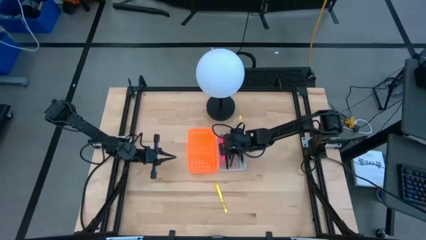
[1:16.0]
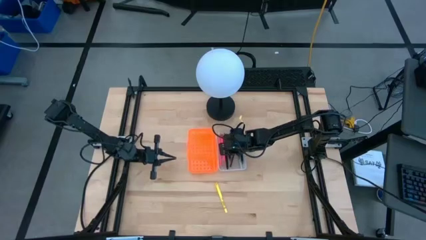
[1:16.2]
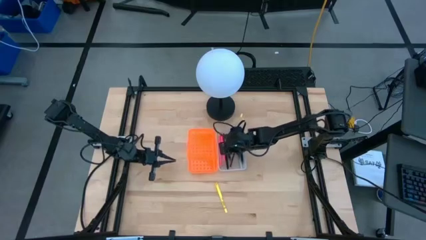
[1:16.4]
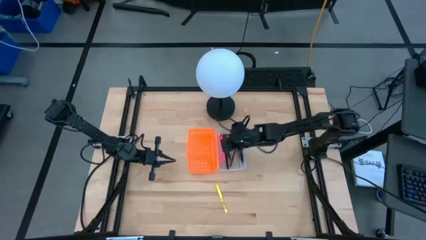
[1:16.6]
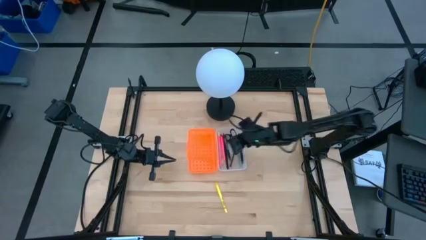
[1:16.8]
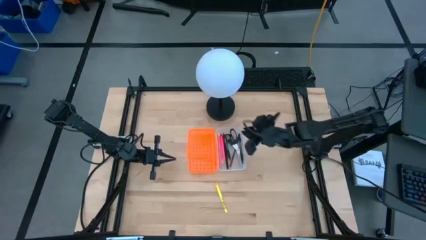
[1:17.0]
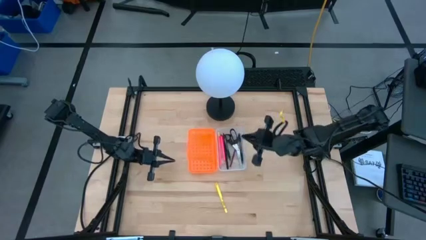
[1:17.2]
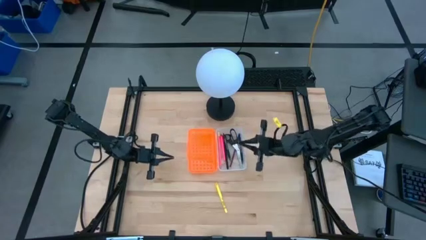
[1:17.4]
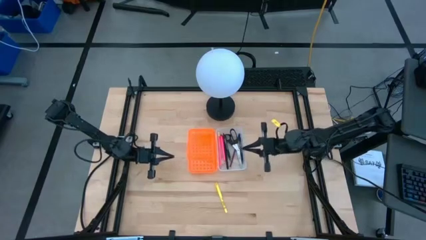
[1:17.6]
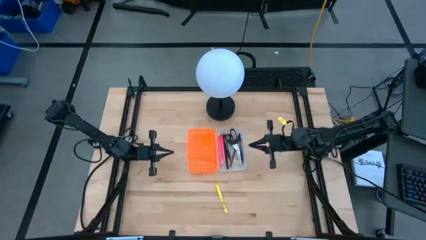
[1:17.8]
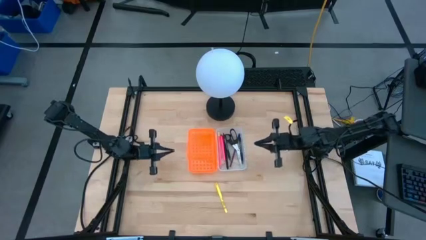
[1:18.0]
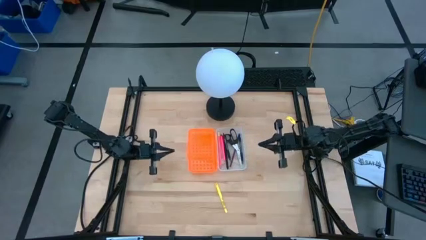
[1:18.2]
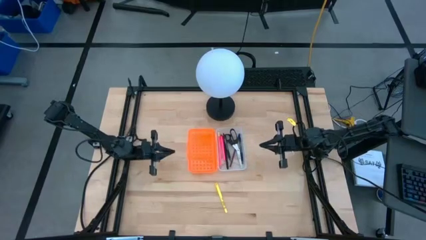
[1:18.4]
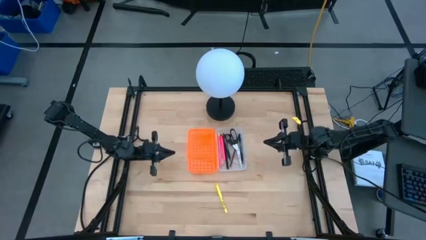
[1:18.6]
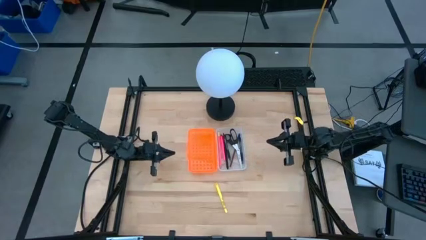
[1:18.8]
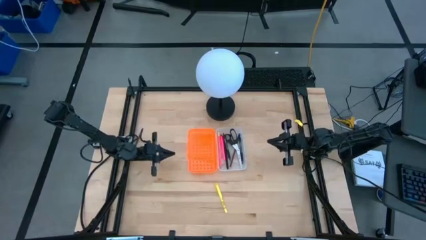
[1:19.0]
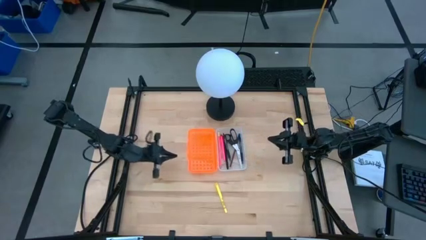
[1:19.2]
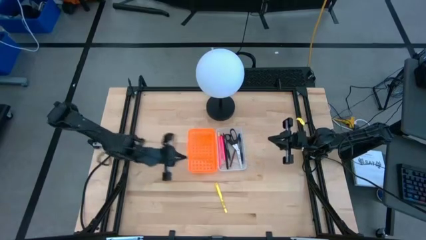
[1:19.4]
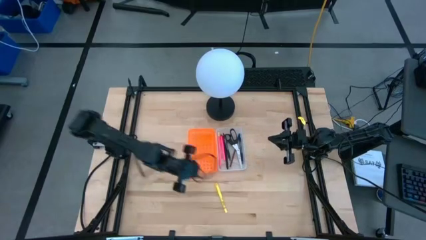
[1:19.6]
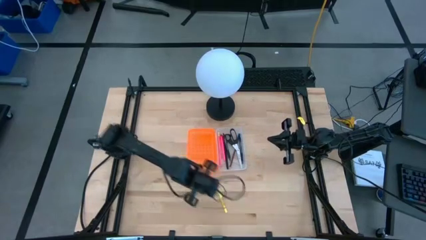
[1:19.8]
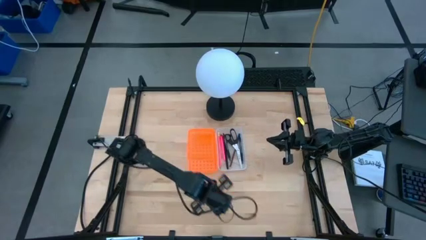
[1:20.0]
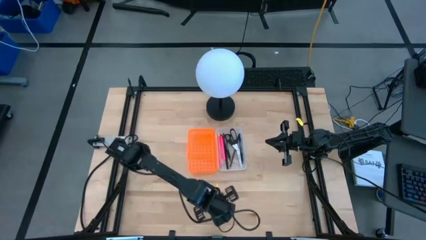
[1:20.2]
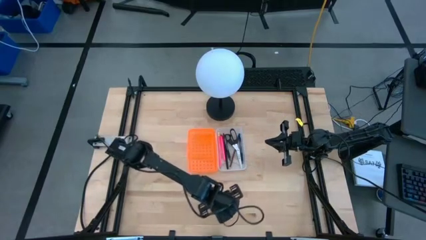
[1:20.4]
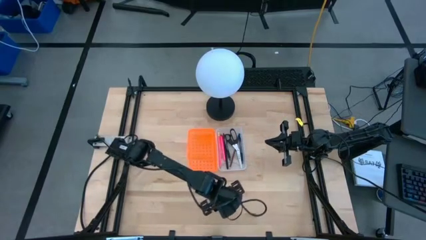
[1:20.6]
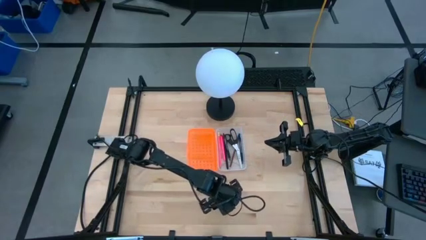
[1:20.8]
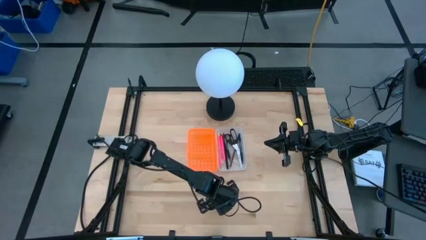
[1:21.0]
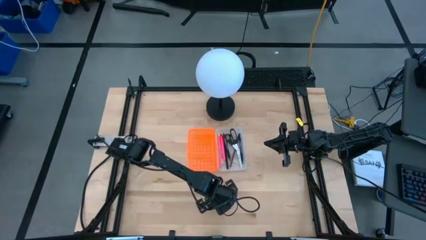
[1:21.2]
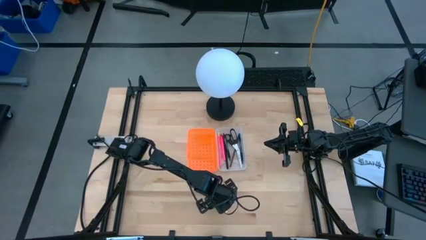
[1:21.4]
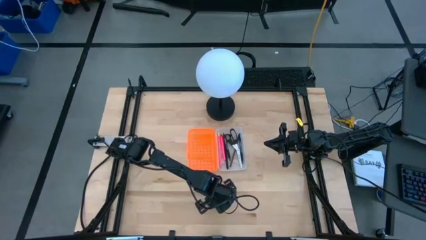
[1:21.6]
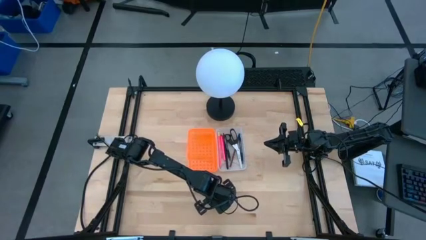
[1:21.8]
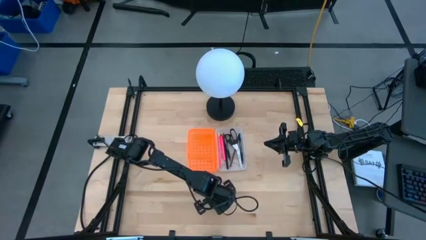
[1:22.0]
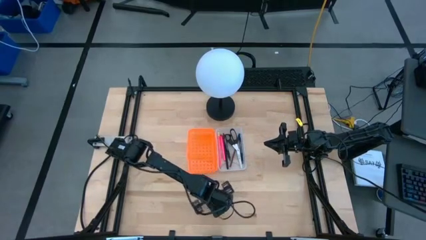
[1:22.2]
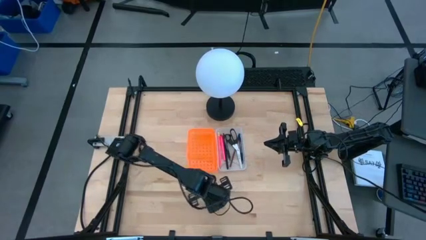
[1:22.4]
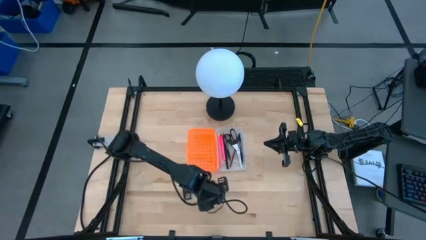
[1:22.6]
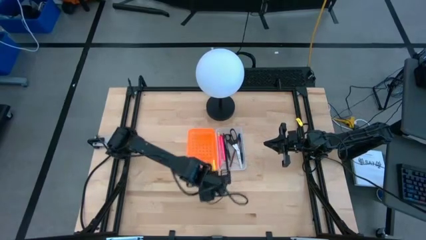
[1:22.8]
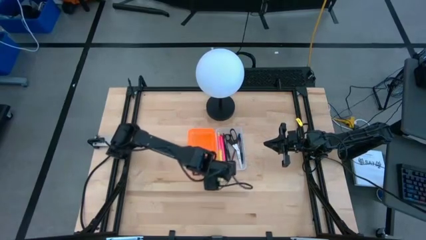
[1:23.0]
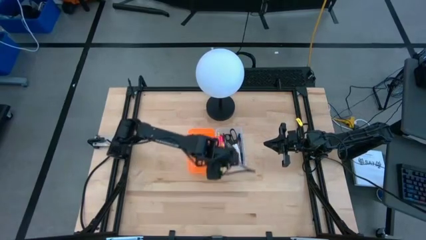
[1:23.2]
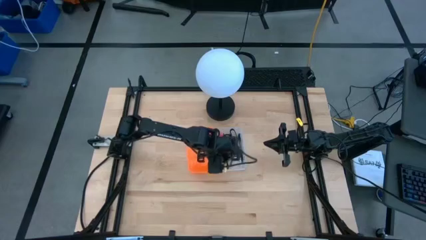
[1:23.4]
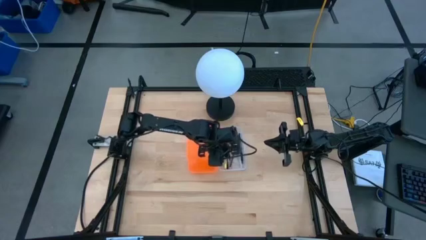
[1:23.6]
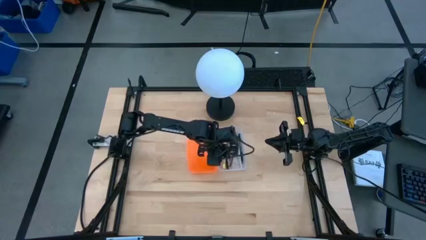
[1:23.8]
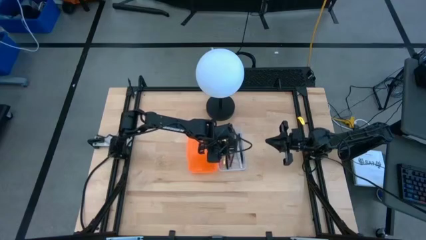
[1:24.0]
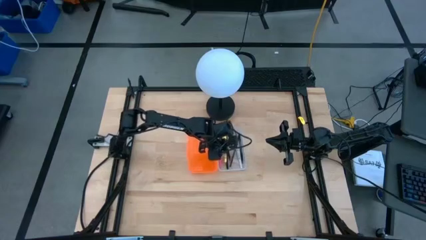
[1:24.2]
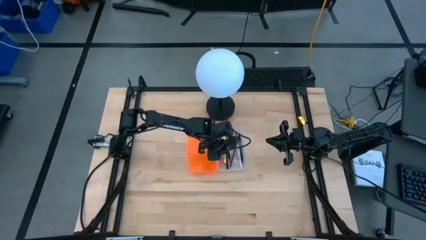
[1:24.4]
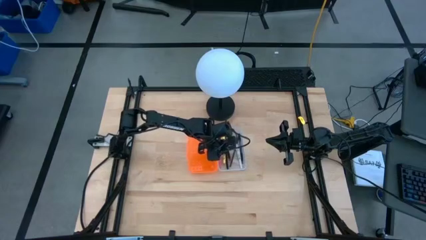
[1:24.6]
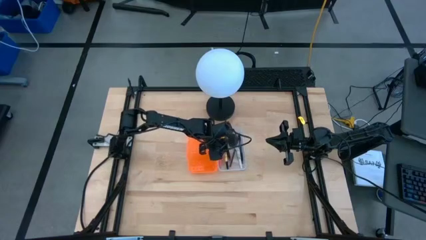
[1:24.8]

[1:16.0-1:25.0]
Task: Pick & place school supplies into a supply box
Put the yellow pen into the pencil box

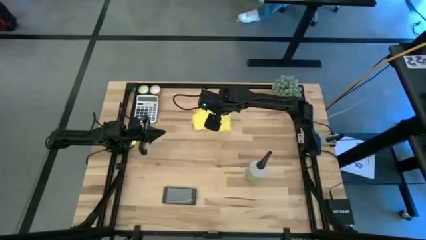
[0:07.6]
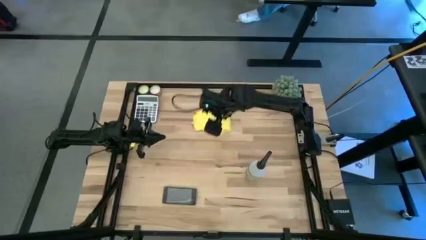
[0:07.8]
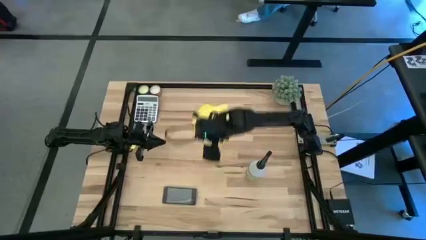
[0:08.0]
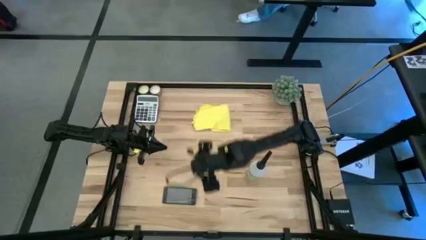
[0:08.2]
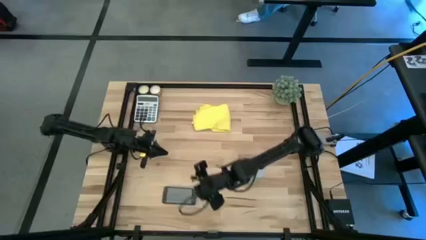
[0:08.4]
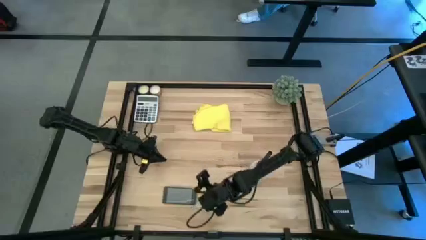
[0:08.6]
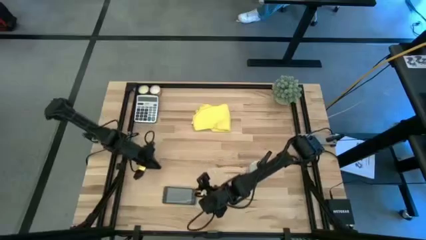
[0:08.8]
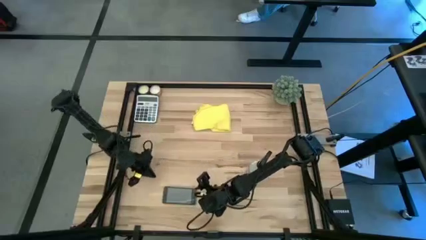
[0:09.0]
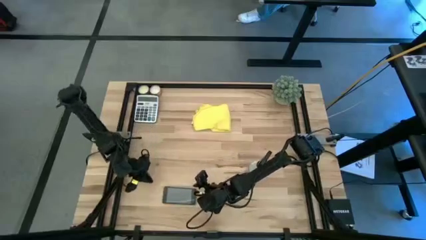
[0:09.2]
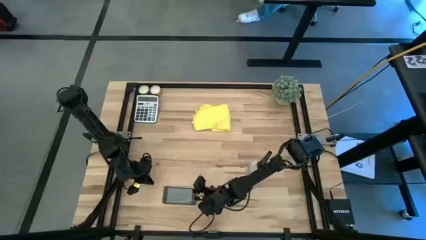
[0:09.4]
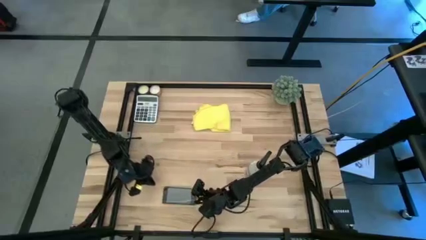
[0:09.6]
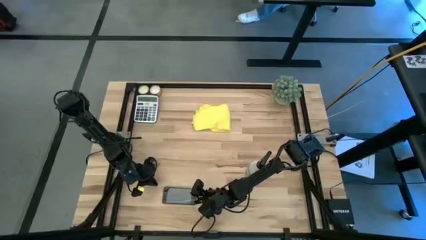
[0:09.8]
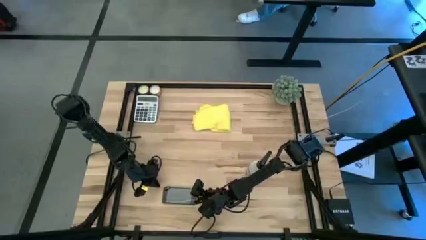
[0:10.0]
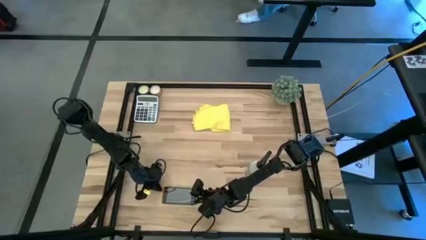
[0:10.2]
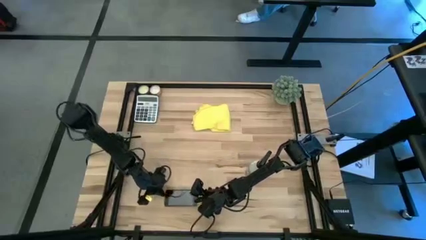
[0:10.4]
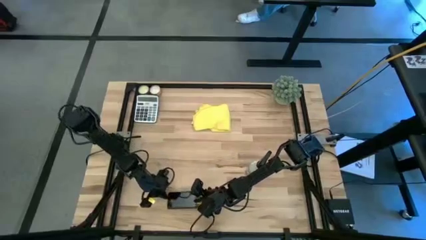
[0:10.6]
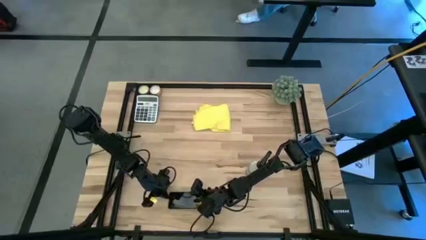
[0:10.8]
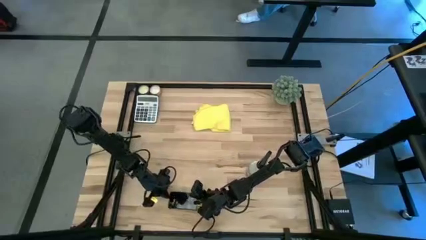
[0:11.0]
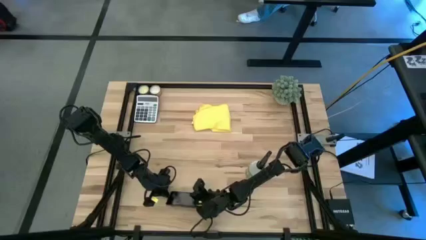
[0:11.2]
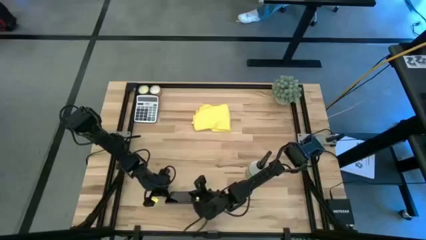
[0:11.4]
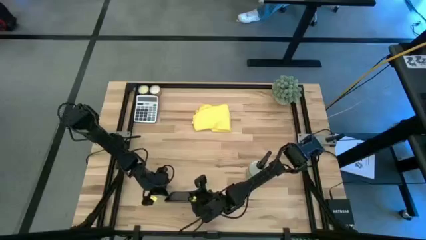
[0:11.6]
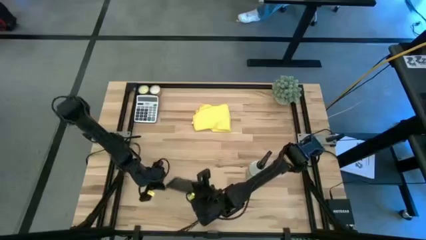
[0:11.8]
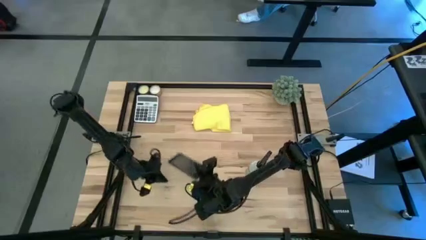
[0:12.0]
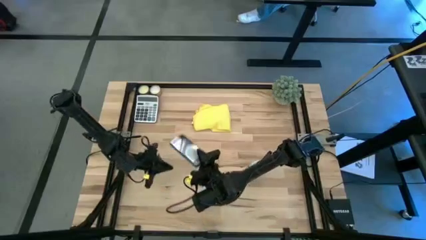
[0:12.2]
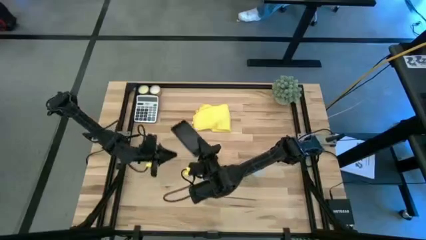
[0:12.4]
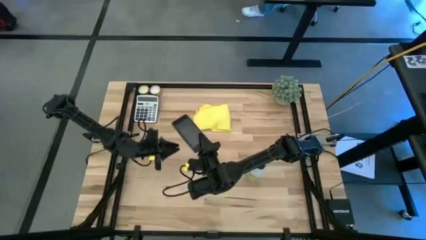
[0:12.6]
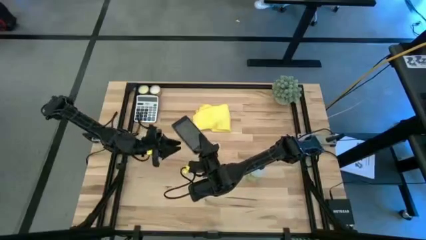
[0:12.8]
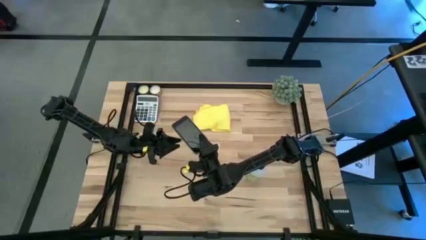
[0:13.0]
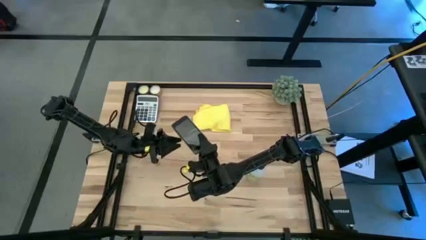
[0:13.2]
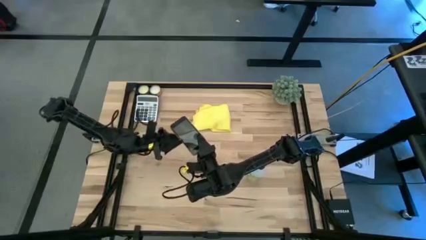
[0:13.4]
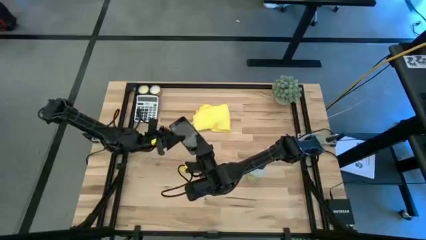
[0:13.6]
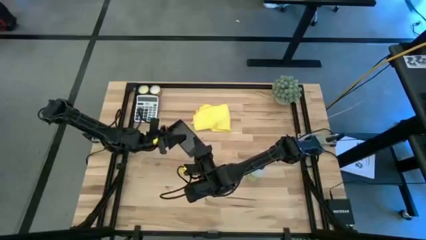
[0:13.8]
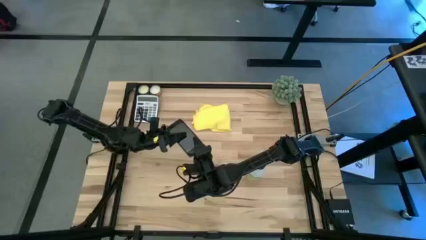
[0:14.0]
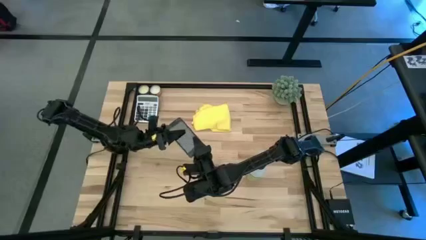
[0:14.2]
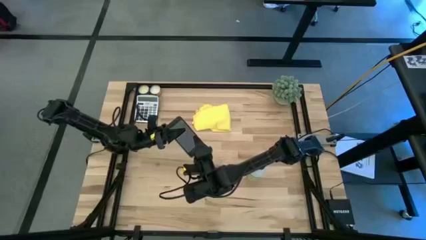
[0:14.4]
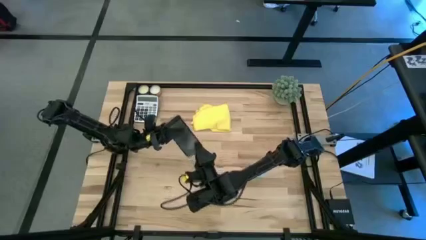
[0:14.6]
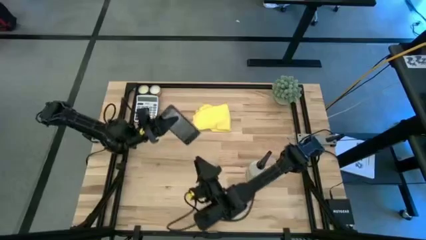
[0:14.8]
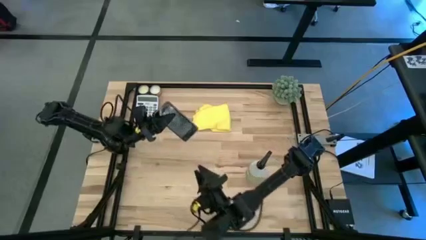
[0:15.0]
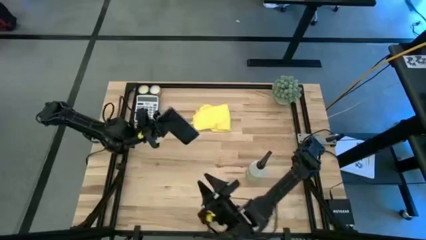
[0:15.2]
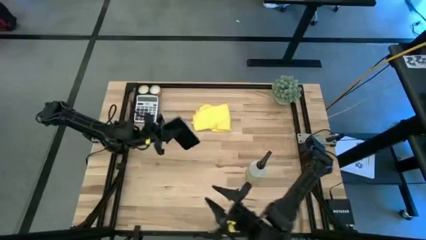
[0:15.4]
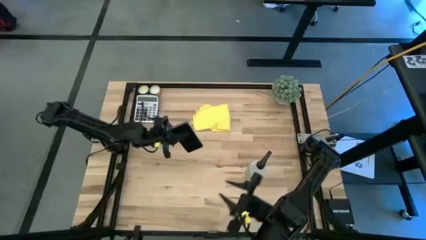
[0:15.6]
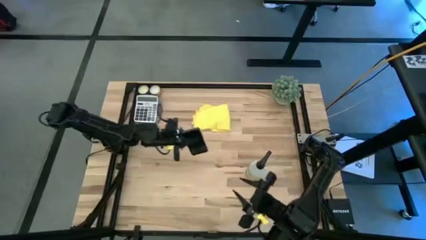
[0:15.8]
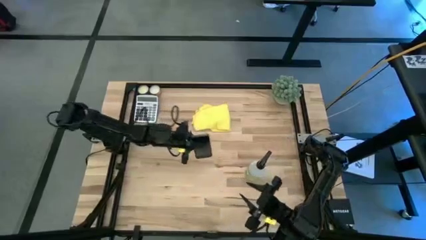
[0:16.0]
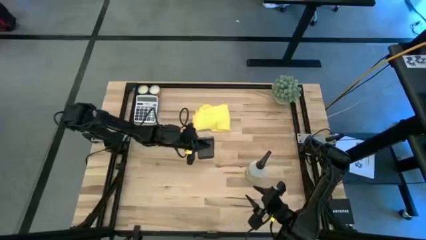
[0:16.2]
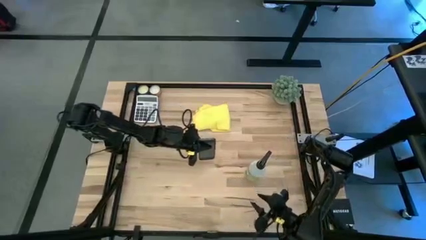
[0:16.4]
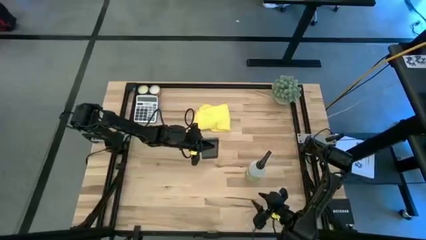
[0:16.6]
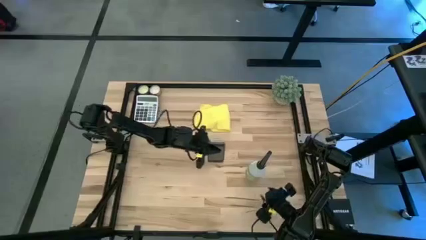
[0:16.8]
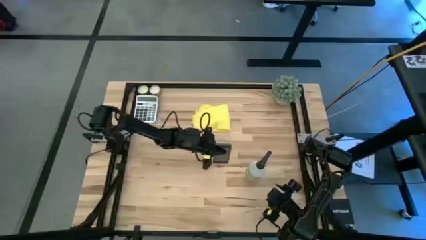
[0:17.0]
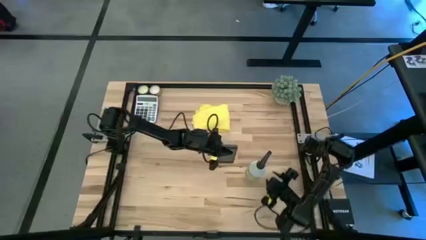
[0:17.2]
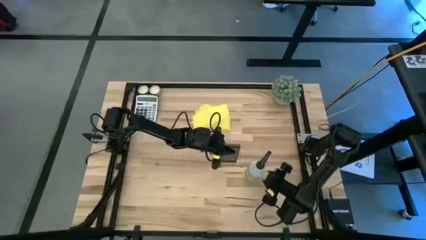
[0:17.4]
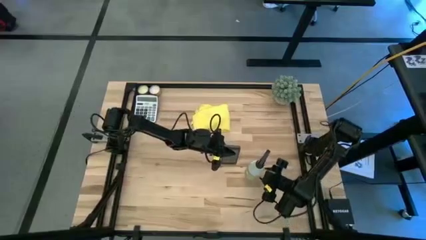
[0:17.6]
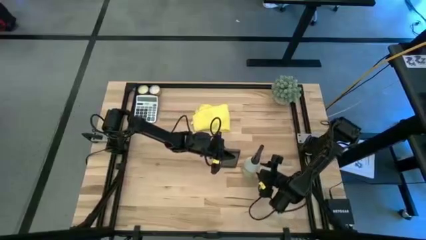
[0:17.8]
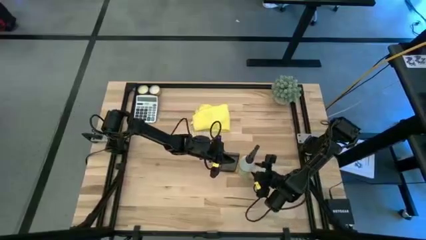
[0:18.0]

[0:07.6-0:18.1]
Task: Apply microfiber cloth
Spray the front of the black cellphone using the white spray bottle
